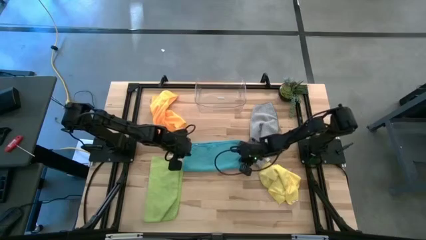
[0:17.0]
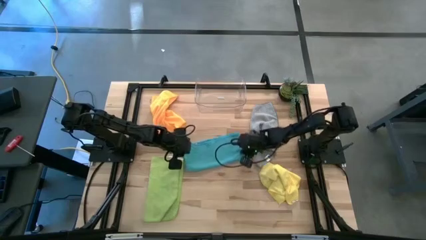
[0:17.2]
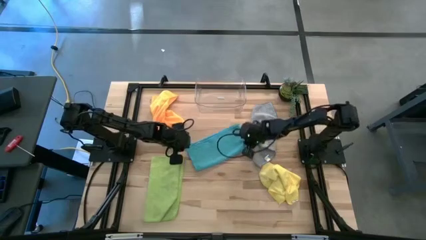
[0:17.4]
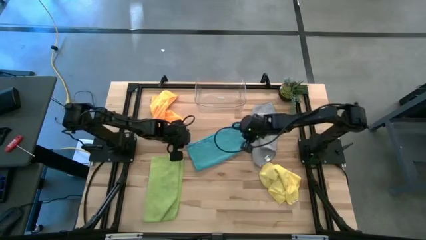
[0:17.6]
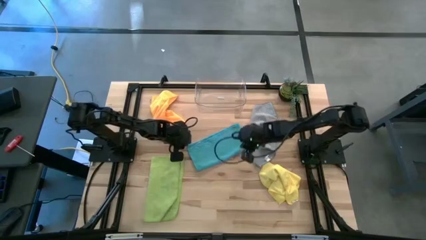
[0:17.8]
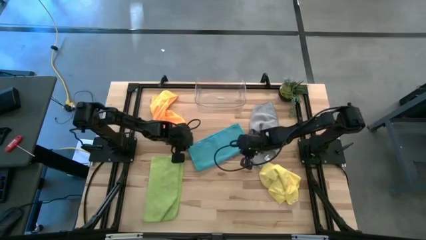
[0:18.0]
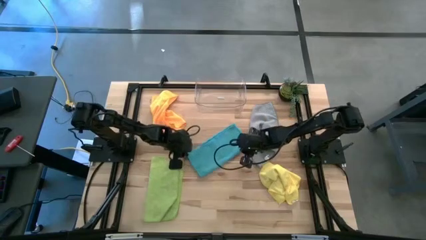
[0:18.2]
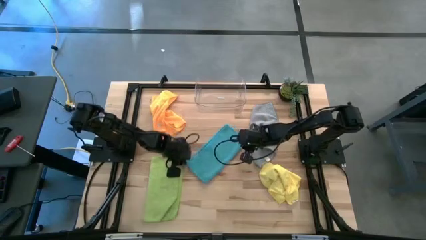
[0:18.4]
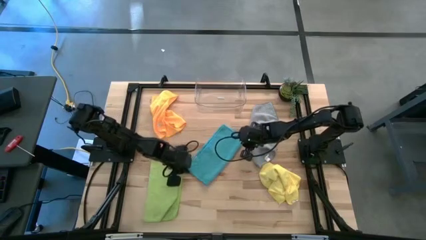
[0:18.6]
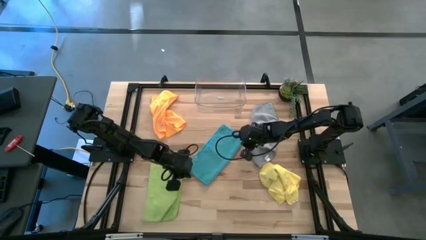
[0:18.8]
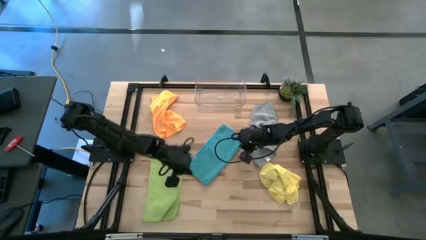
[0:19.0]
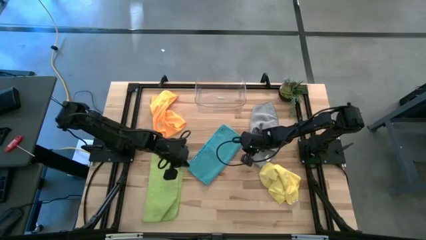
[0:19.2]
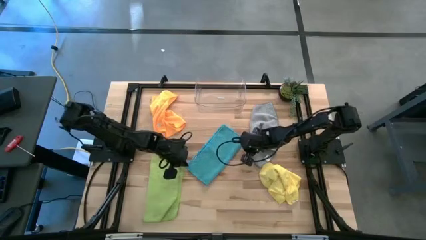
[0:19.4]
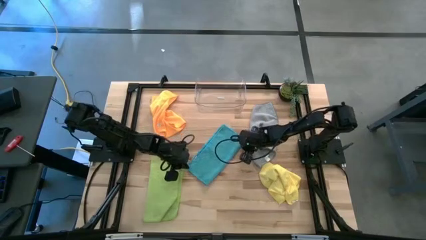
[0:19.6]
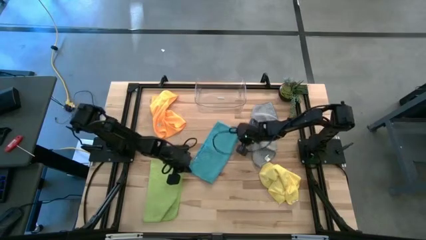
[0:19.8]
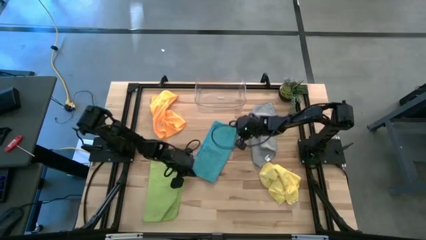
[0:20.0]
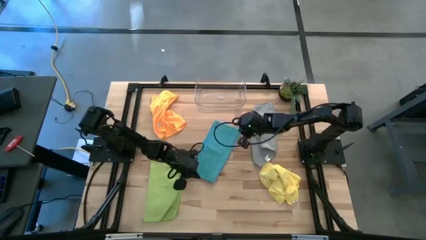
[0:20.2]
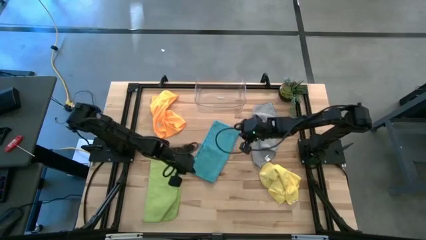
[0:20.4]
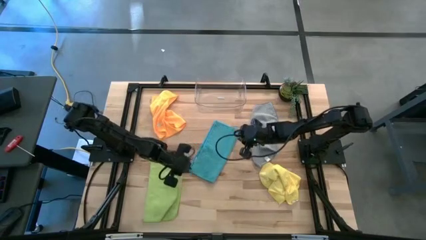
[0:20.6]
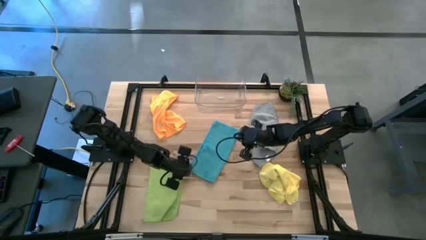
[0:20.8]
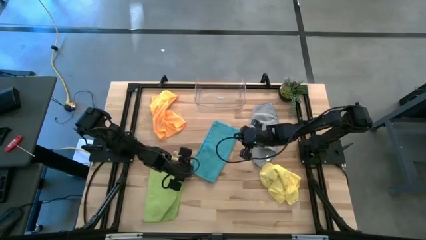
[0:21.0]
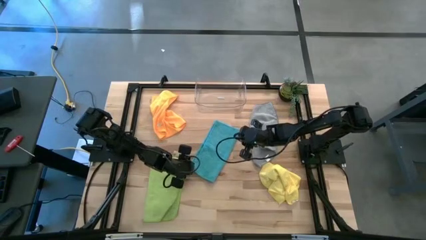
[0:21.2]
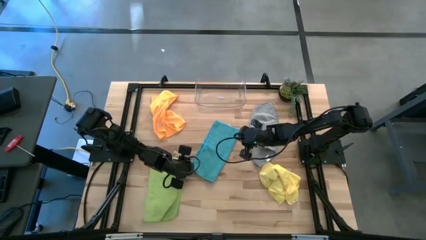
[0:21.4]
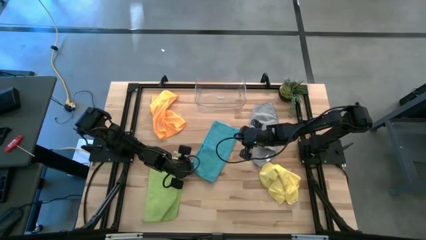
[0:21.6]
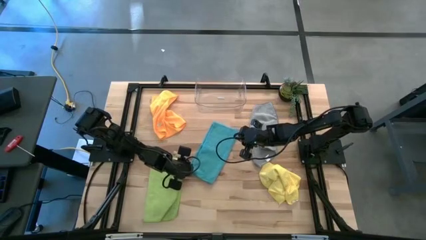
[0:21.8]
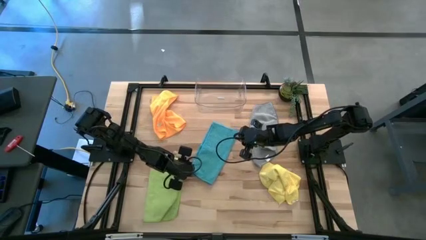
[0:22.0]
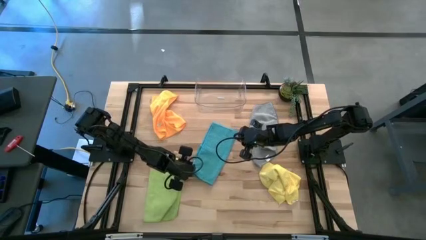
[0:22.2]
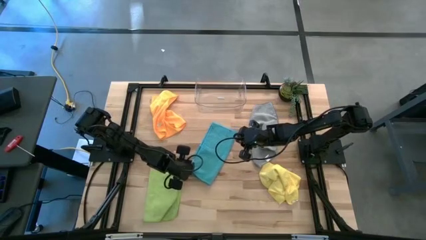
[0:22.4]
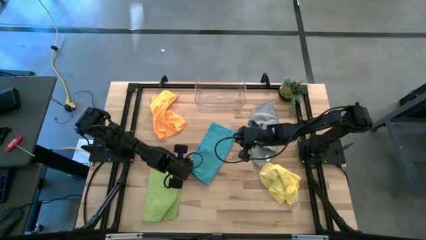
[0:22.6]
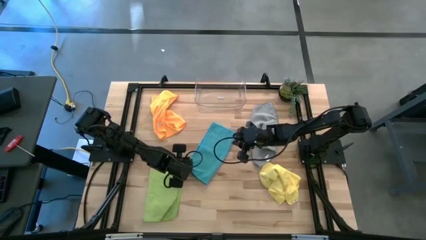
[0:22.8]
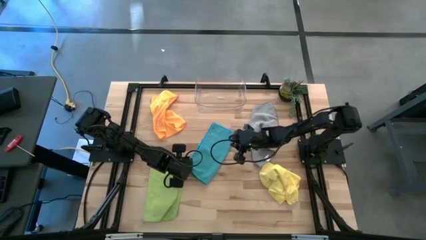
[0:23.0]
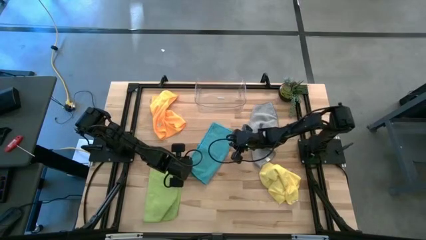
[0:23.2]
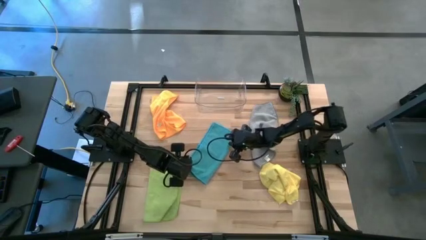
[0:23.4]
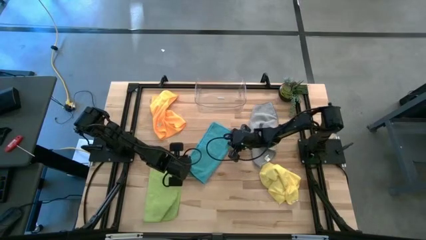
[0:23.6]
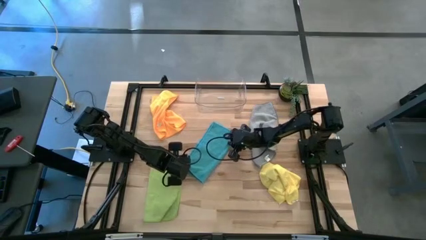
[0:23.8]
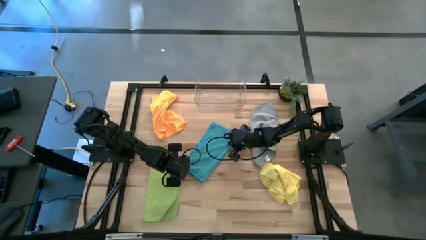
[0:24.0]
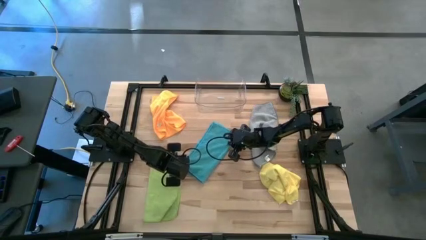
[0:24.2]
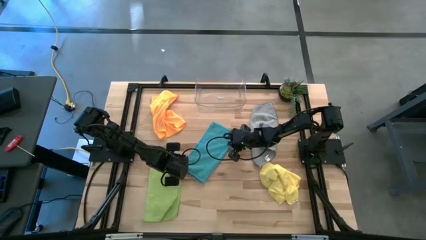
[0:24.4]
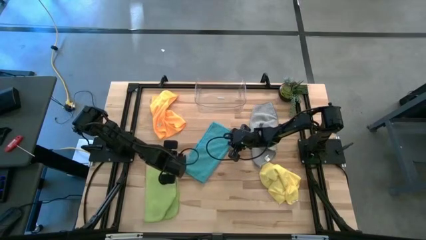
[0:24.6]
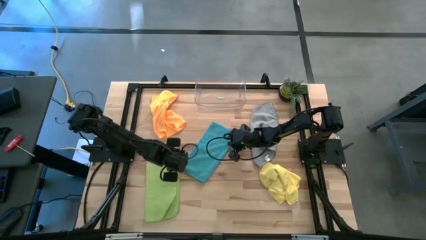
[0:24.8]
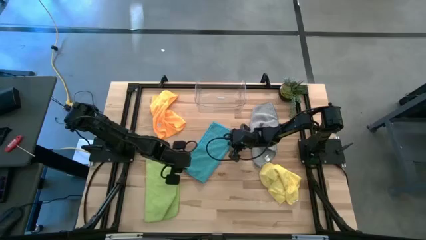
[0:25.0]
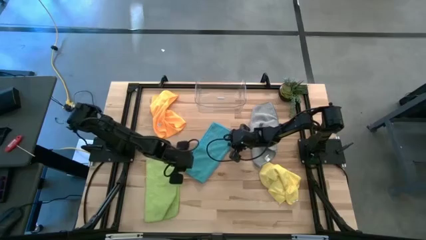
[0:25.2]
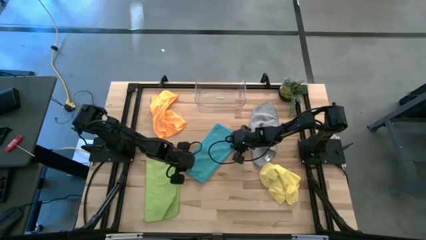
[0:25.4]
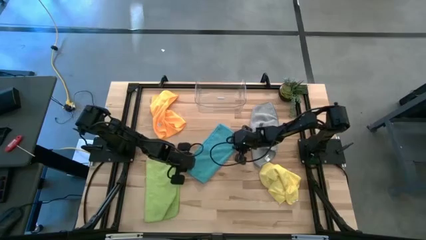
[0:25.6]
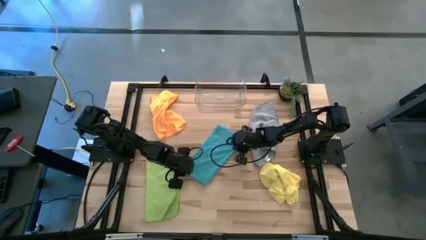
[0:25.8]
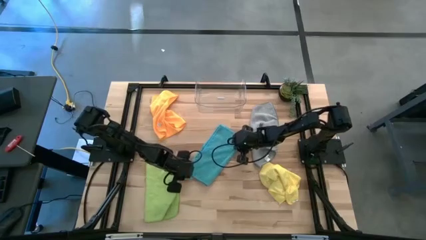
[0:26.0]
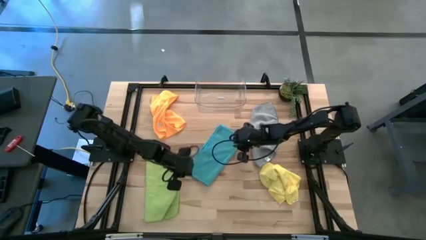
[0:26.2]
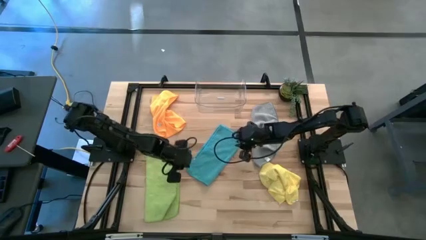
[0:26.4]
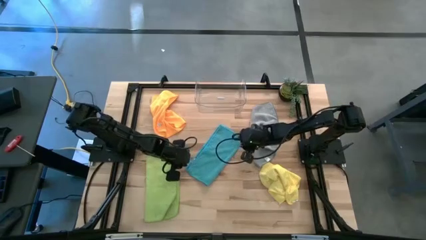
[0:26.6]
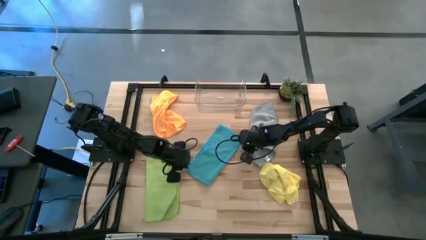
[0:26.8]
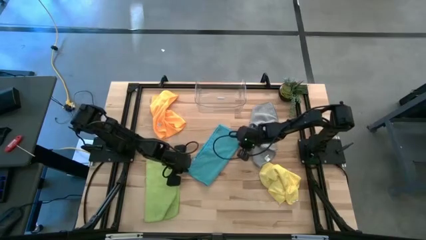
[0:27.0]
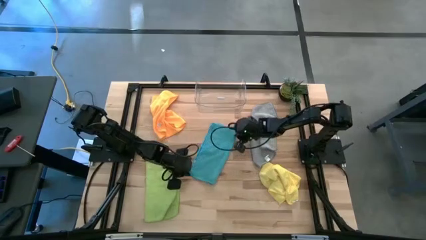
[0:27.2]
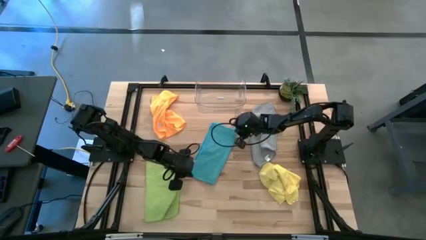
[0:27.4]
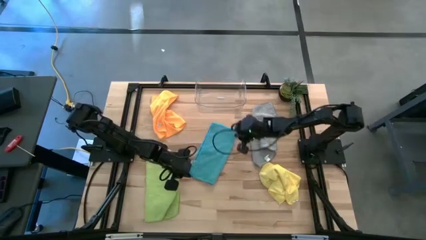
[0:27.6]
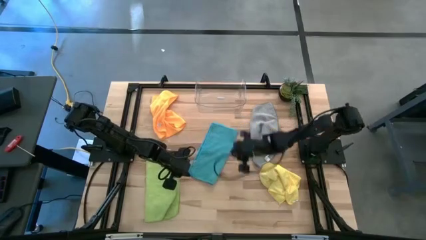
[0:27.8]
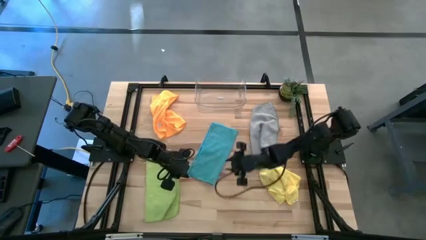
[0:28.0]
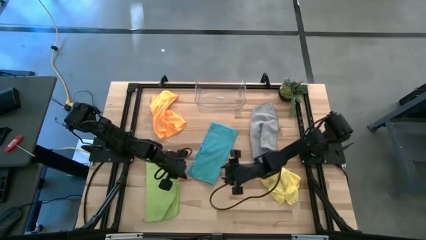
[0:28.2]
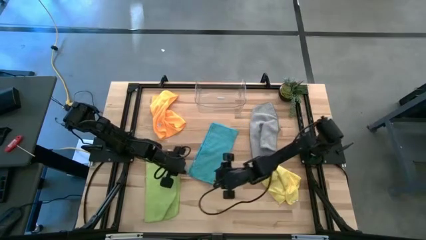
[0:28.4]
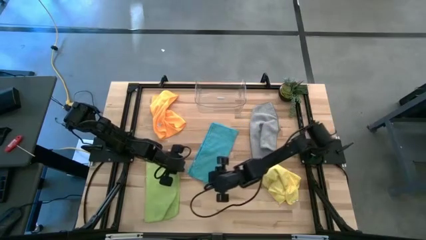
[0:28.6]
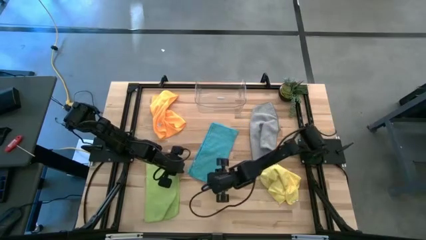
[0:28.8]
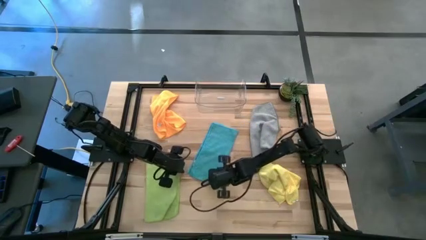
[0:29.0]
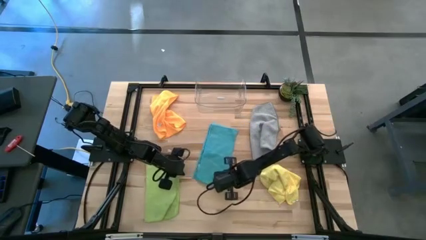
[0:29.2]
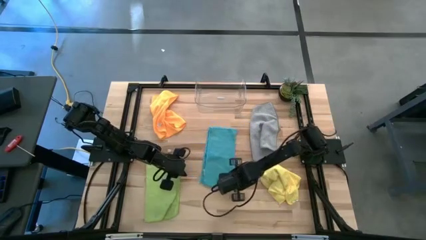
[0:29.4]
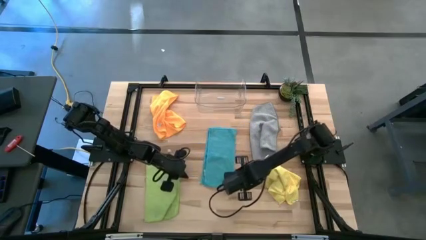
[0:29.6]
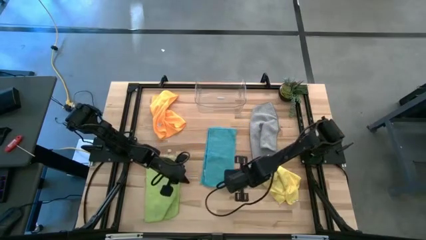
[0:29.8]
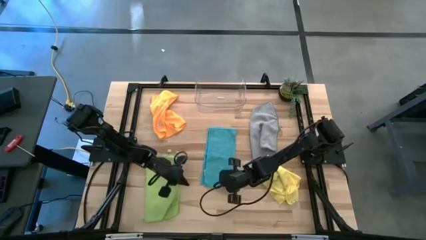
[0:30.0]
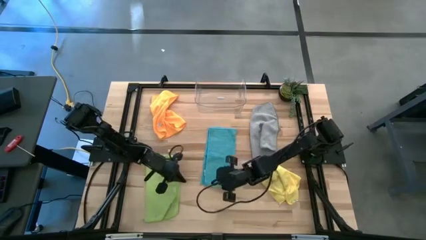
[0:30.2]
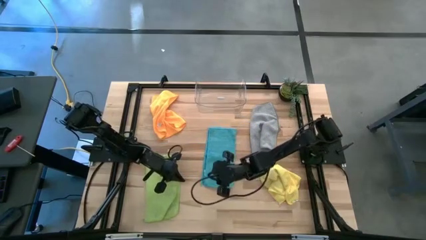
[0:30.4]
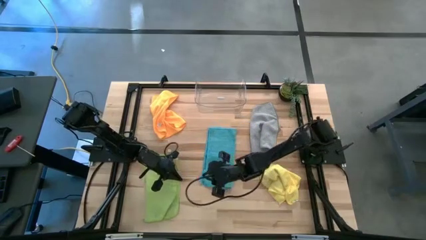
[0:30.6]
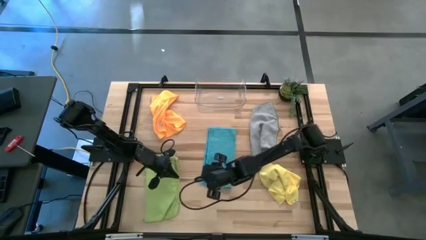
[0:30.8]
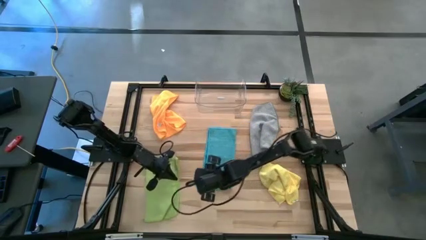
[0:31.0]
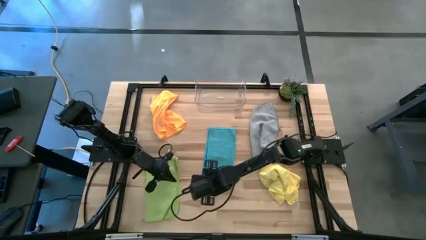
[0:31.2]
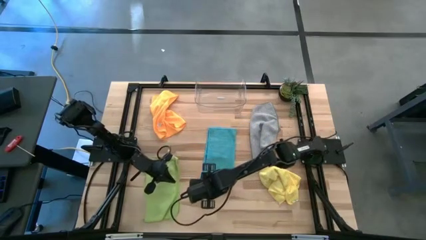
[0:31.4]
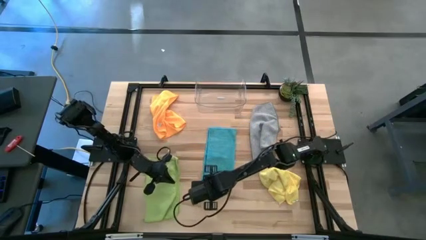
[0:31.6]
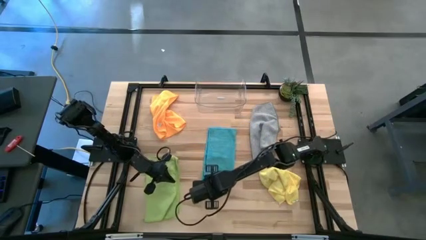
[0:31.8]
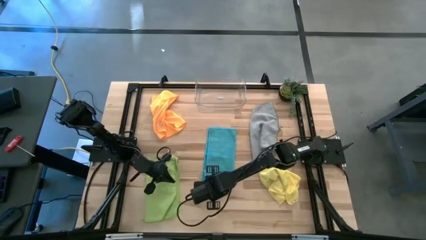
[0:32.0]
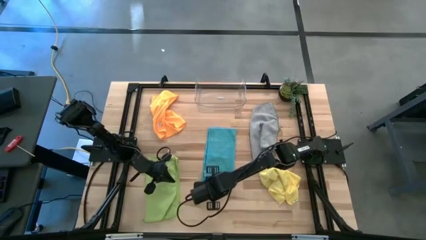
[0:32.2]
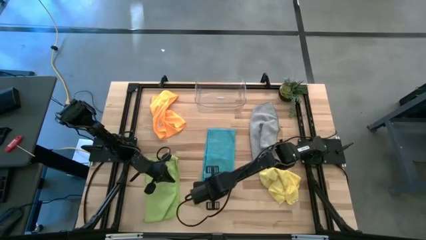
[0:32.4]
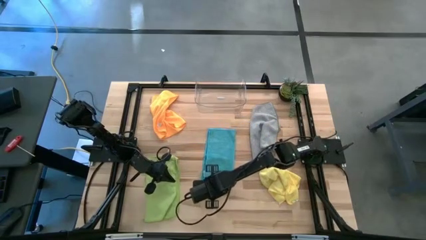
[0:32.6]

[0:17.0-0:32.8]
Task: Fold microfiber towels
Fold the blue towel on the table
